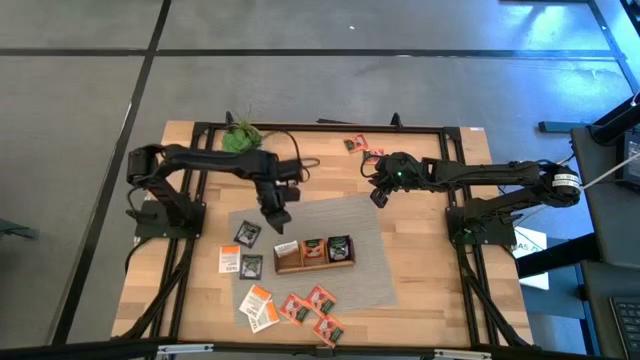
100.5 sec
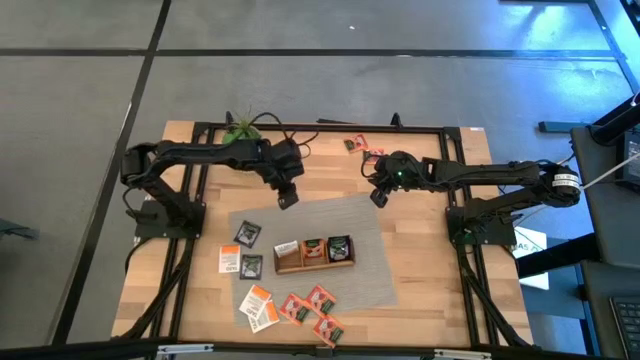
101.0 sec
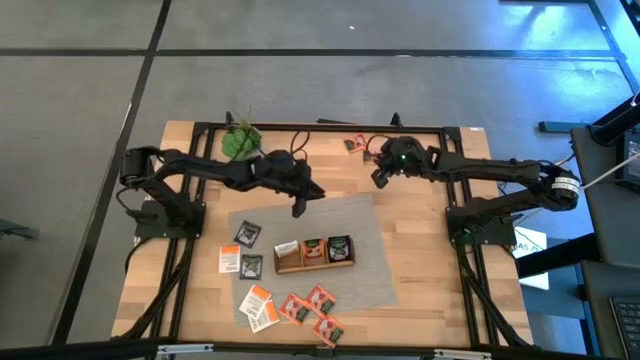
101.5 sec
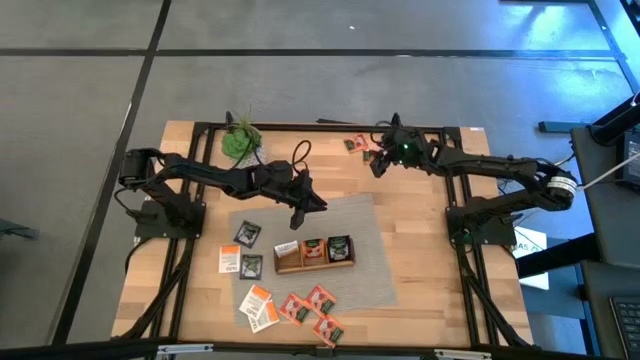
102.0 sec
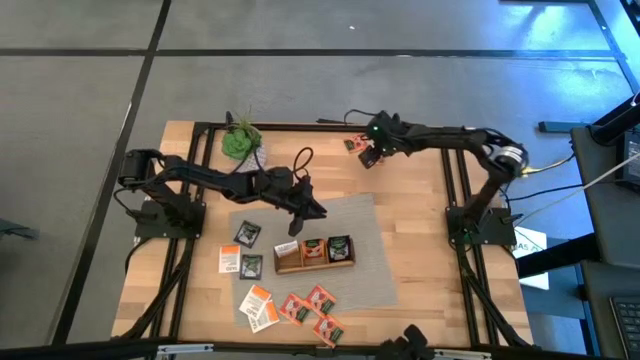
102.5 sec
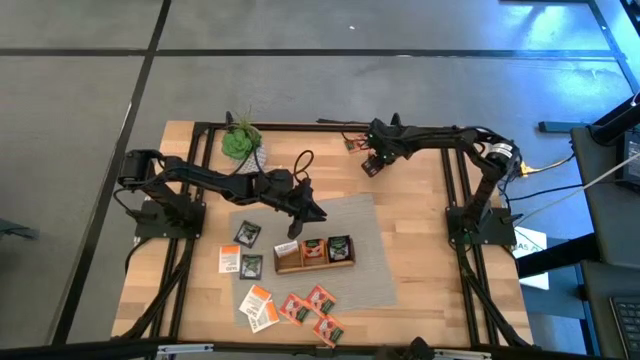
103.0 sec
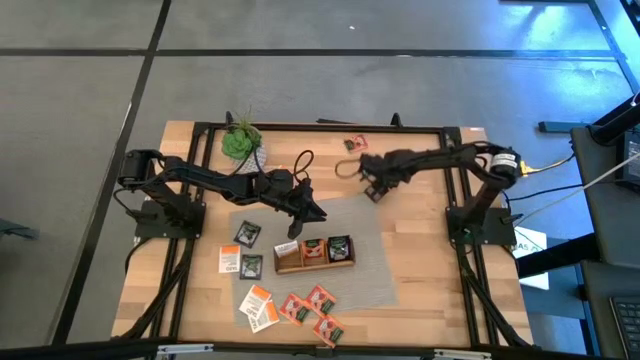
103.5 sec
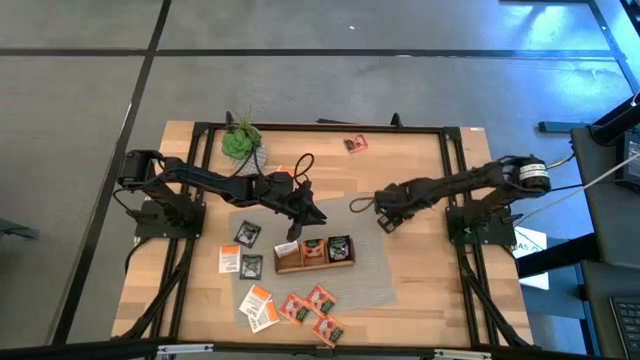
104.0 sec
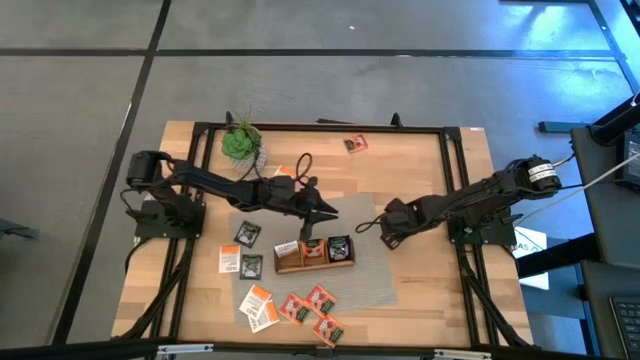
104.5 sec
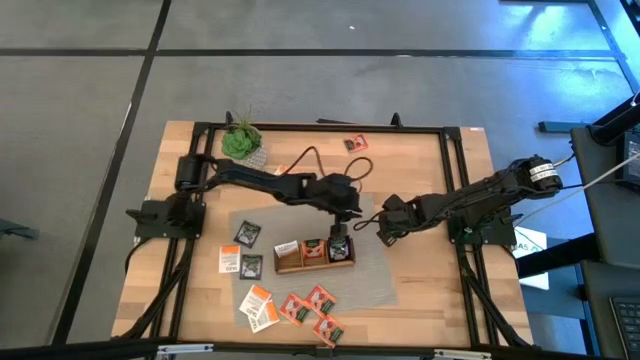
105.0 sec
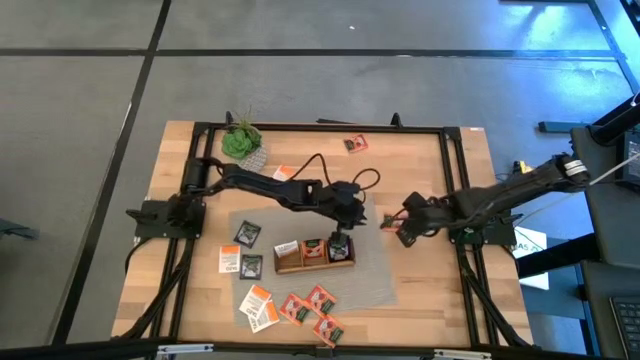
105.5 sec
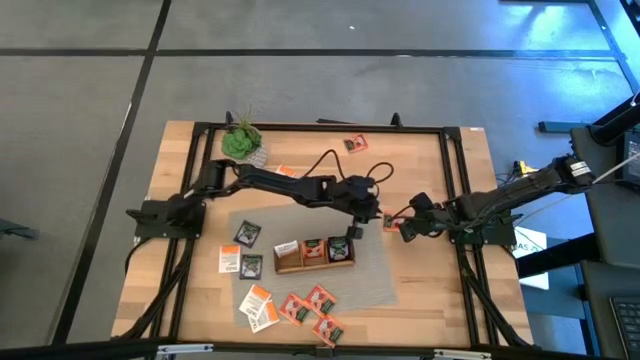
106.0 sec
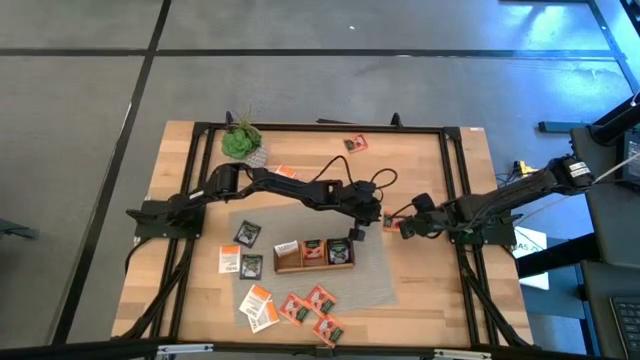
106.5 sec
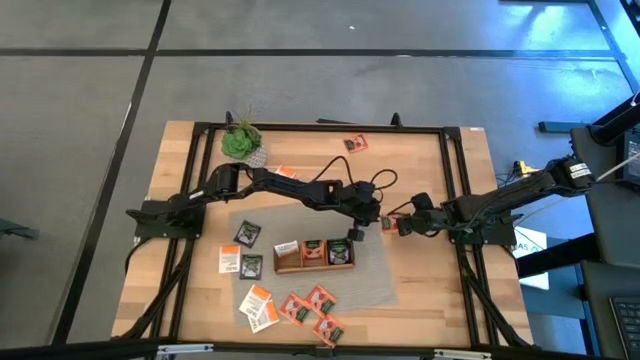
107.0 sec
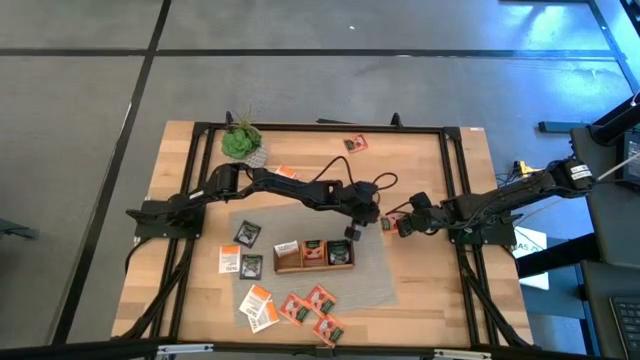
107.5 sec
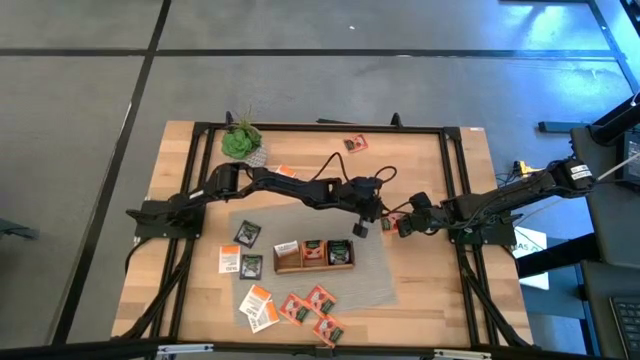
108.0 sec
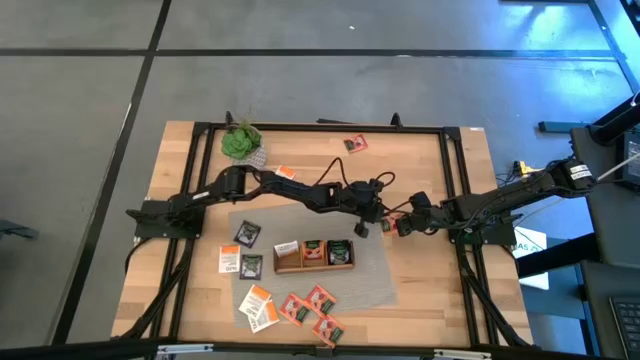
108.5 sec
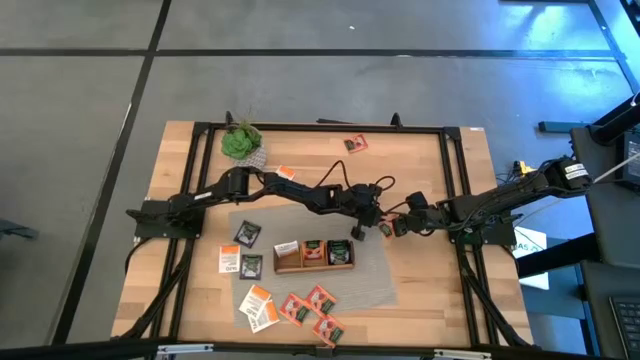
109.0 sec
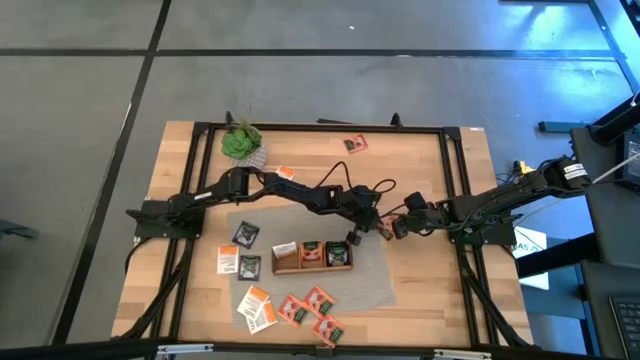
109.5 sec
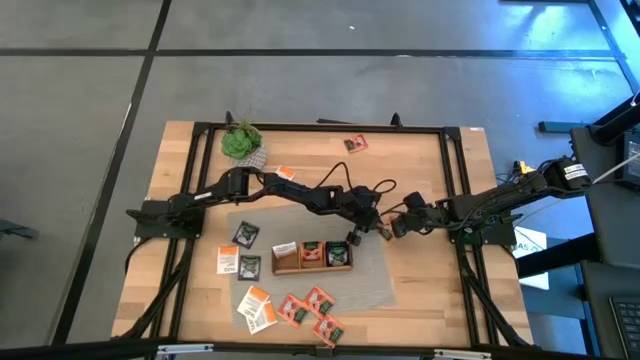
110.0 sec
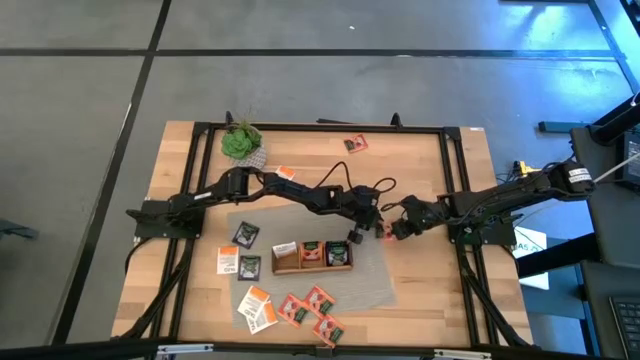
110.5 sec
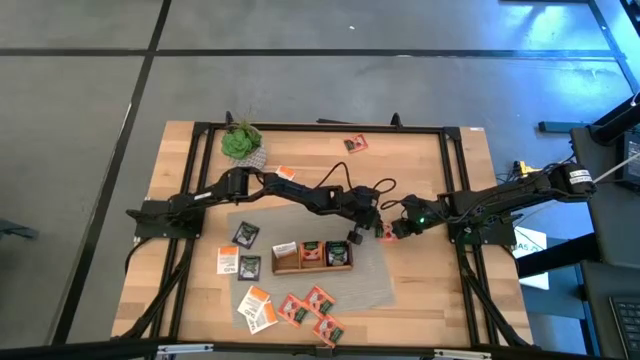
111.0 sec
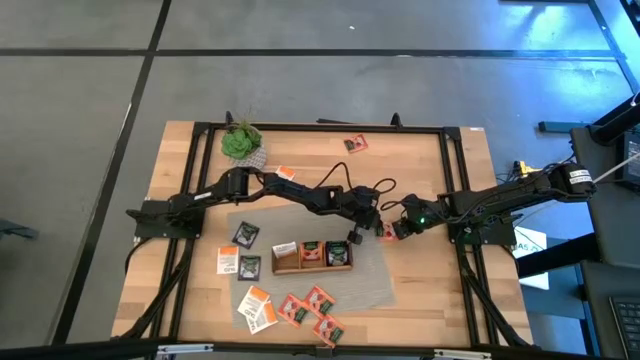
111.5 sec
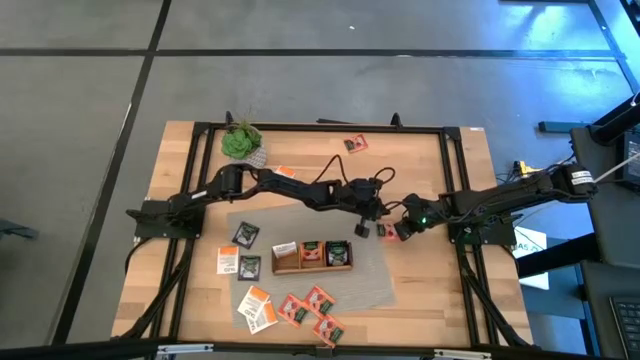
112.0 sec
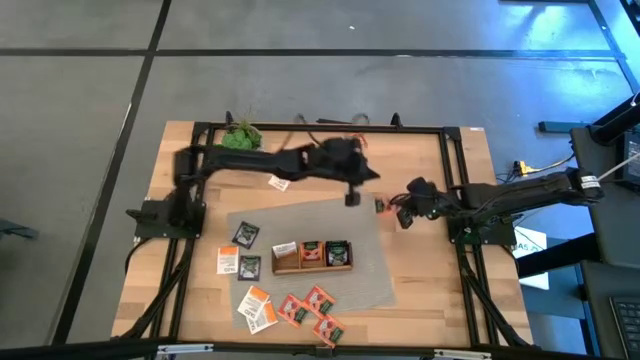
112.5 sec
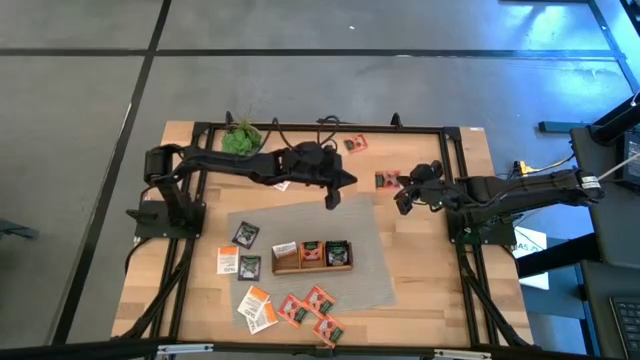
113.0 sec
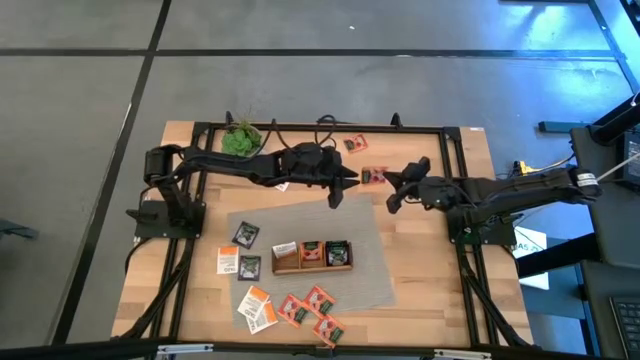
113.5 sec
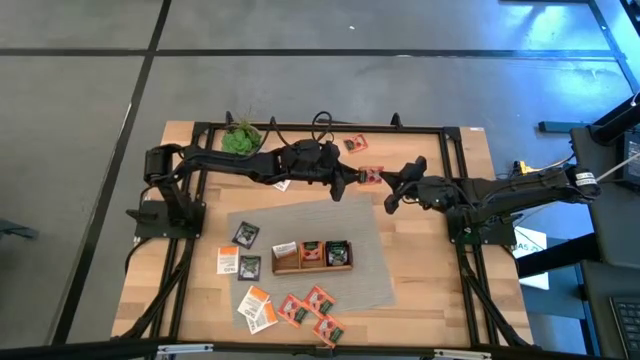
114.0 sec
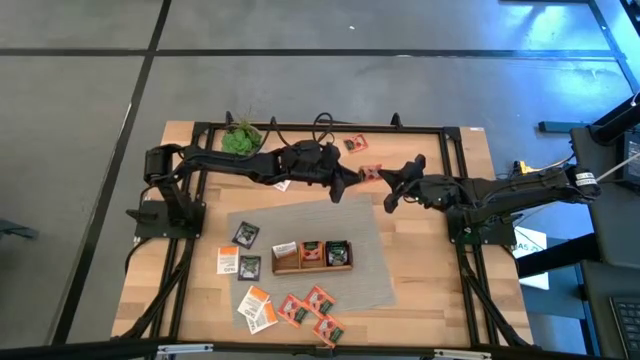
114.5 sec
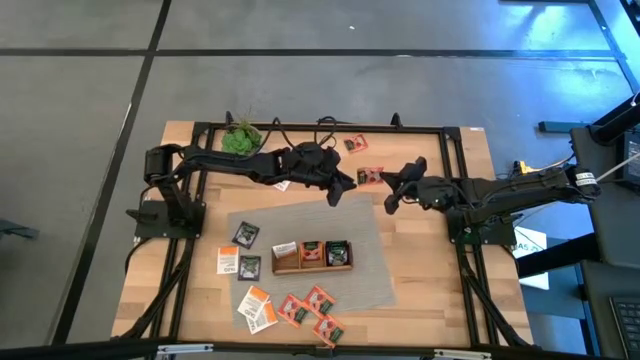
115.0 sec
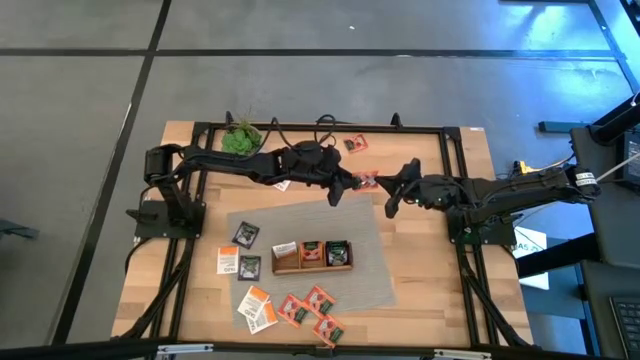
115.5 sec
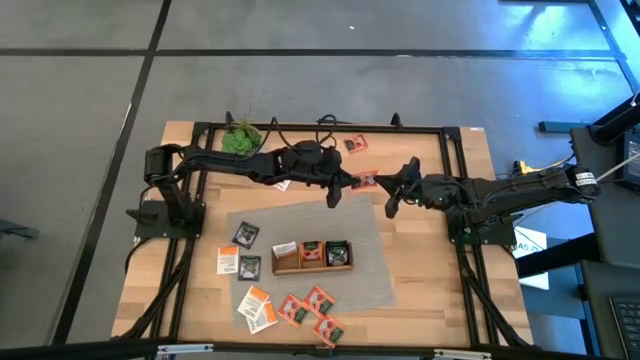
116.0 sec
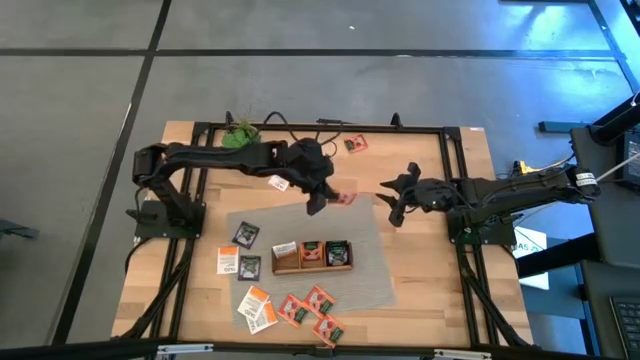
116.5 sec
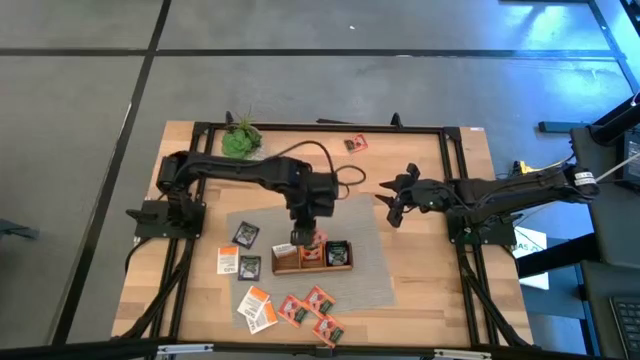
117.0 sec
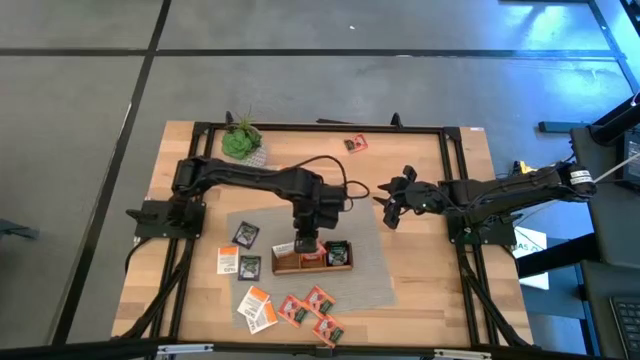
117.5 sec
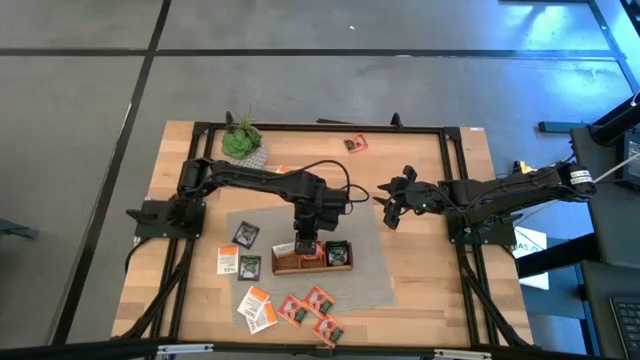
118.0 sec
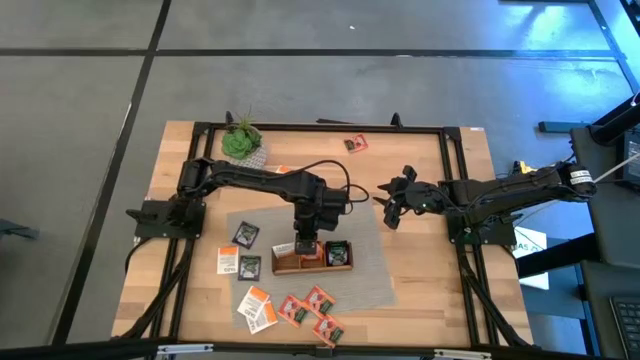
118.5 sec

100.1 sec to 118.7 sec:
Task: Pick & Place Tea
Put the orange tea bag into the middle section of the wooden organizer

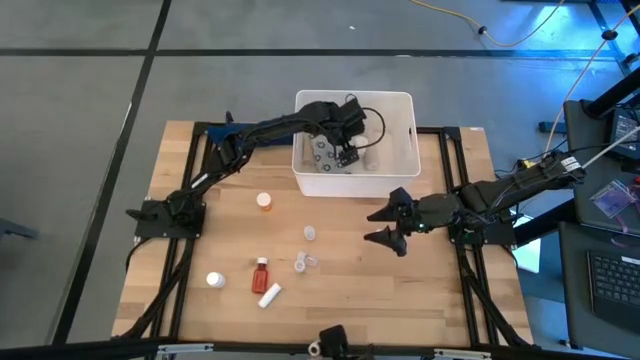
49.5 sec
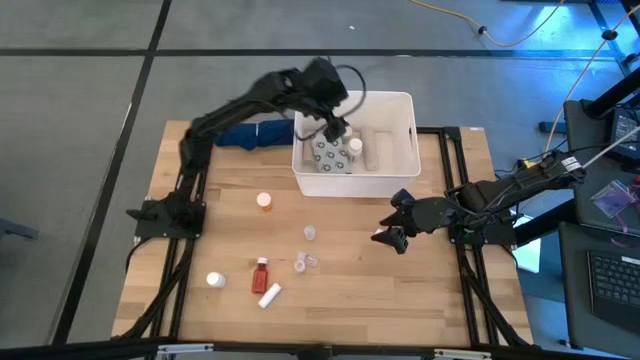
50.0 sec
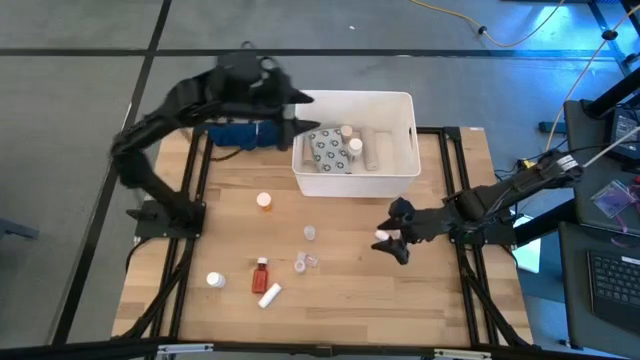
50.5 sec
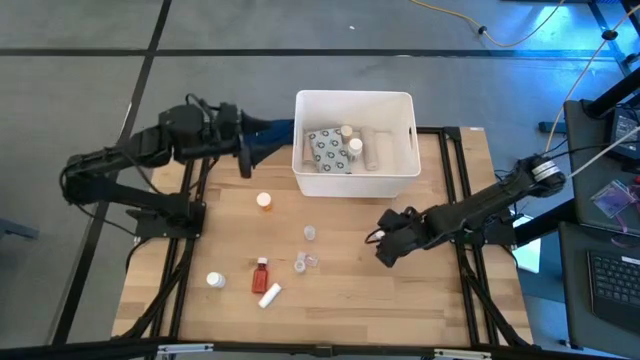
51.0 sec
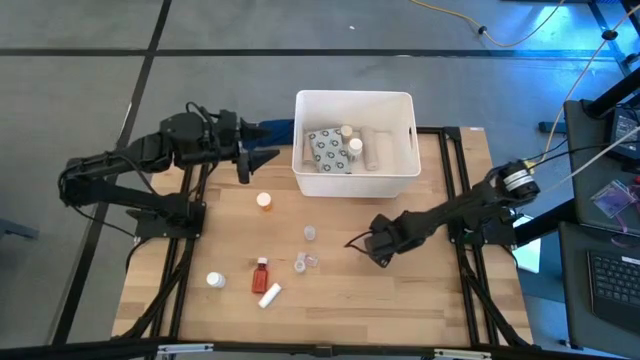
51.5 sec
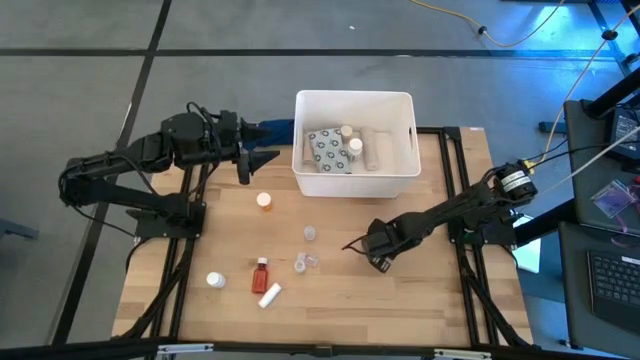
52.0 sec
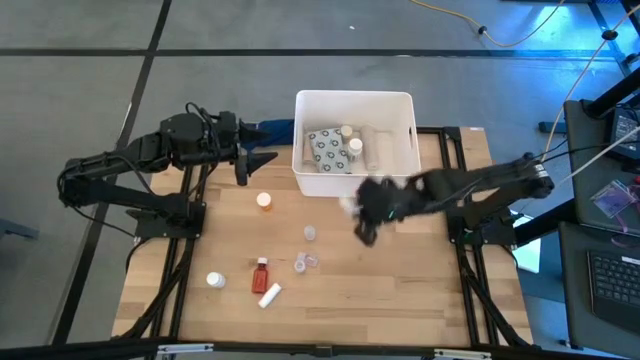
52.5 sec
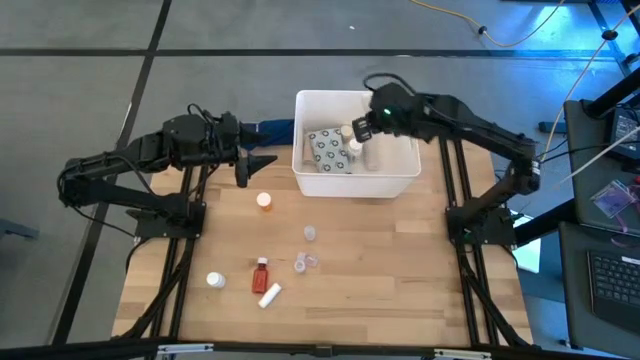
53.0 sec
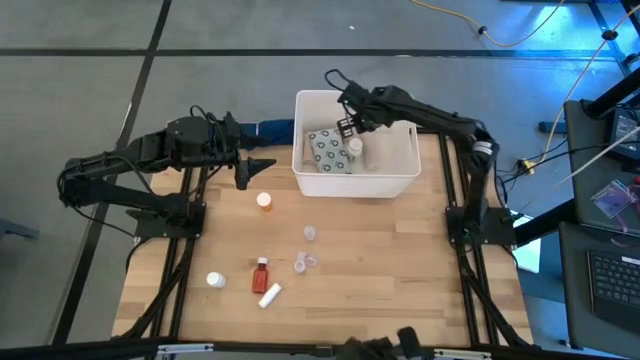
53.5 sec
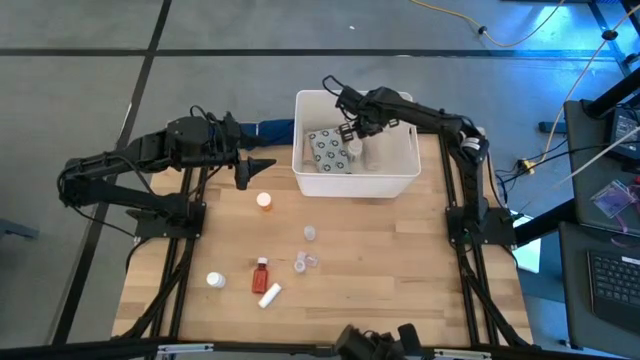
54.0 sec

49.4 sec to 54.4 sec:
Task: Pick & place medical supplies in basket/bin
Put the right white rolled gauze into the white bin
